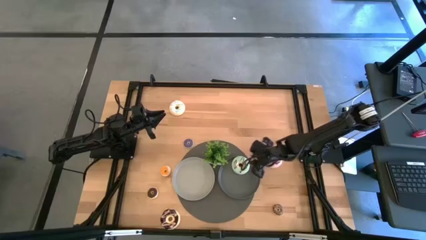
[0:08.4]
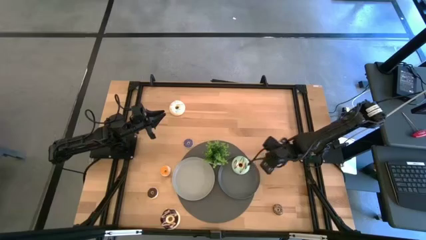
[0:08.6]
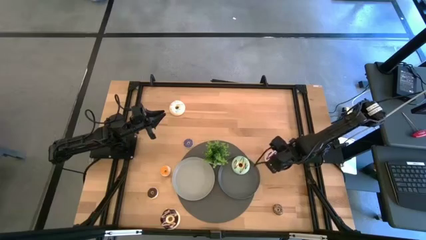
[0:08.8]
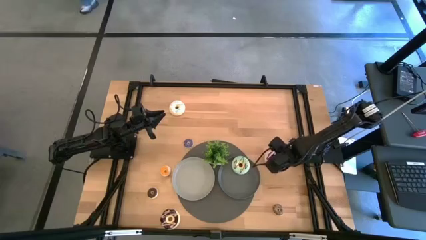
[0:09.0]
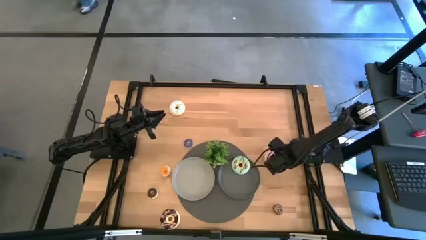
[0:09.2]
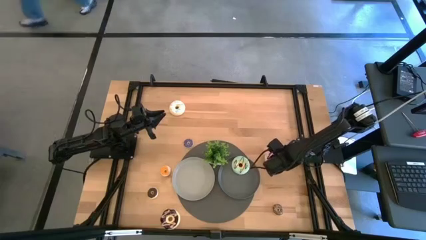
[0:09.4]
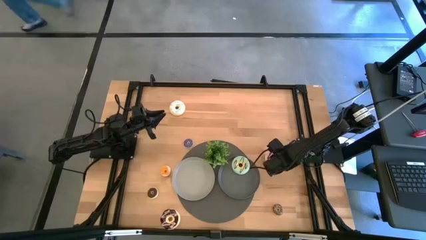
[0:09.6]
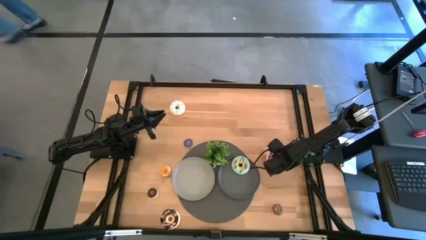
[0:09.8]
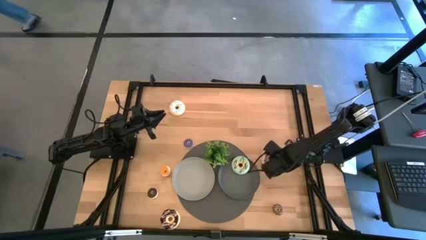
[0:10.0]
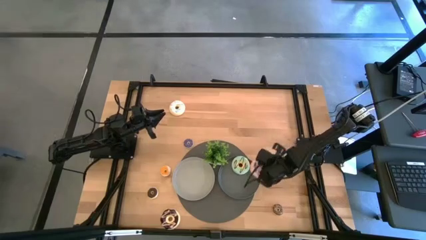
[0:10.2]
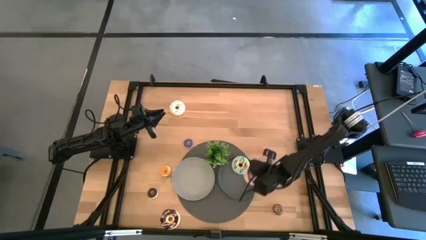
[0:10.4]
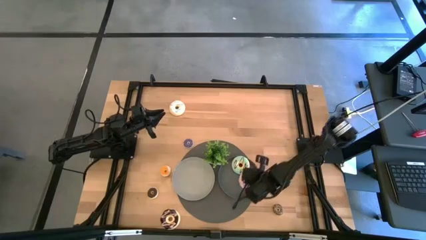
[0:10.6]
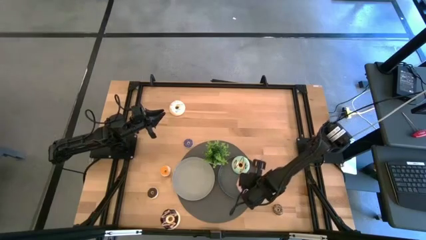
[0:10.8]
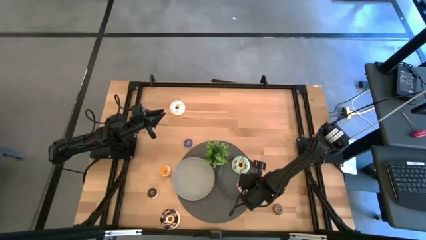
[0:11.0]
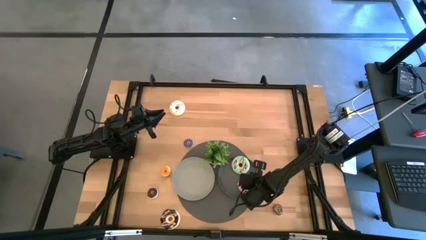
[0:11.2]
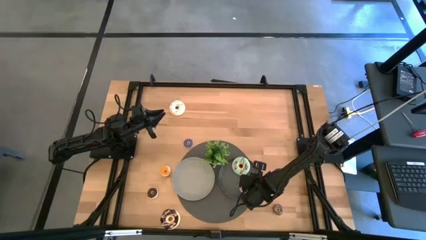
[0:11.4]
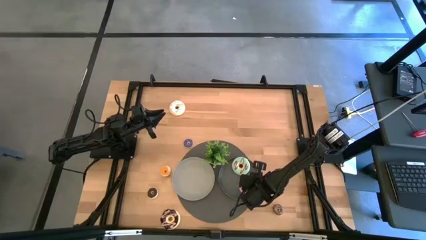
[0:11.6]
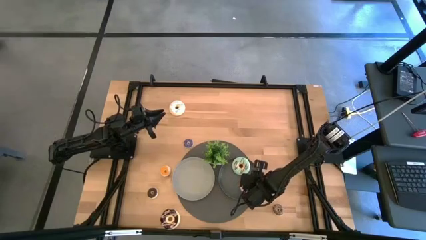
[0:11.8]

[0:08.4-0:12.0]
Task: Pick & Place donuts
Put the large purple donut on the black plate

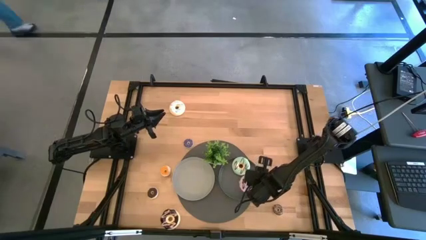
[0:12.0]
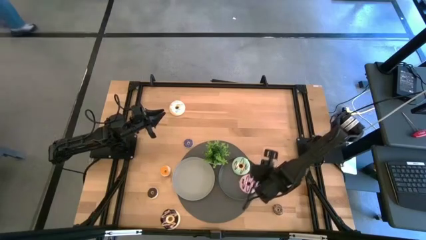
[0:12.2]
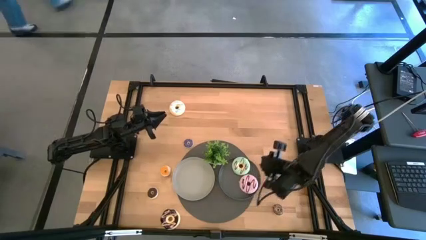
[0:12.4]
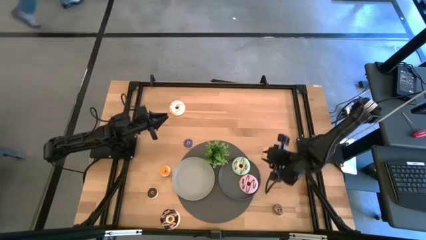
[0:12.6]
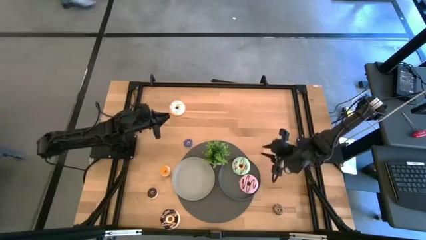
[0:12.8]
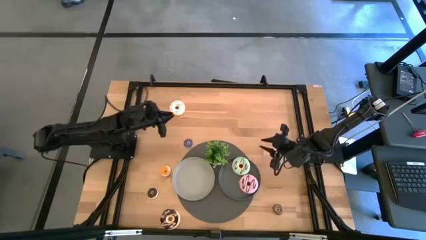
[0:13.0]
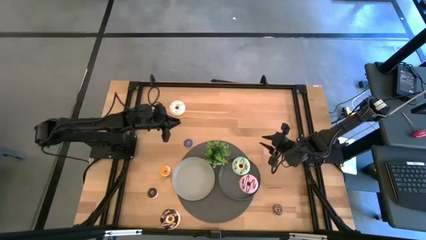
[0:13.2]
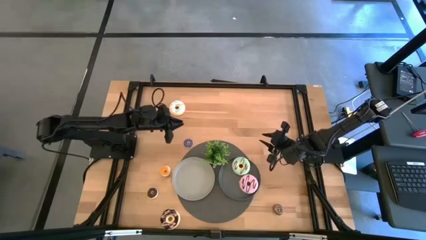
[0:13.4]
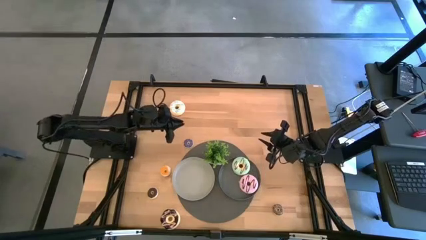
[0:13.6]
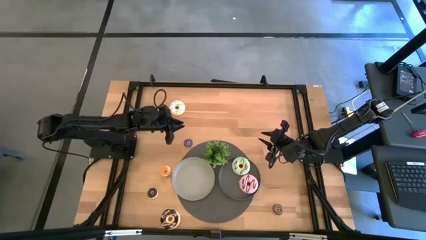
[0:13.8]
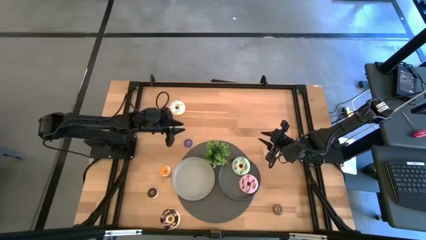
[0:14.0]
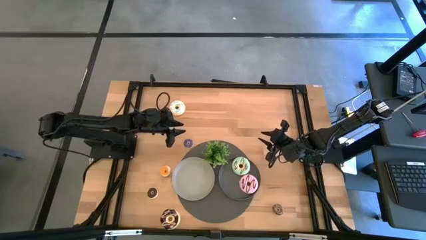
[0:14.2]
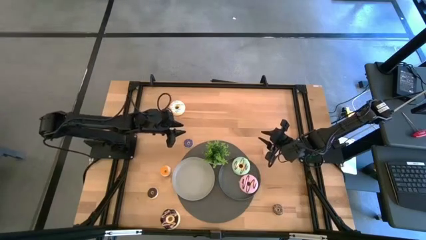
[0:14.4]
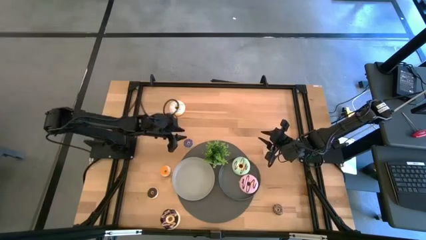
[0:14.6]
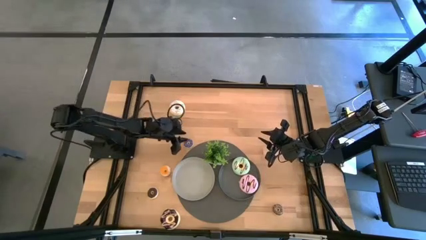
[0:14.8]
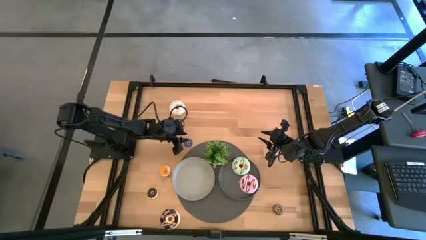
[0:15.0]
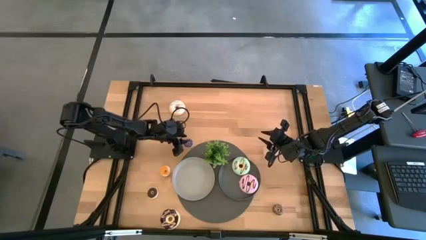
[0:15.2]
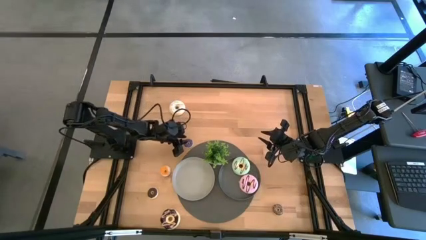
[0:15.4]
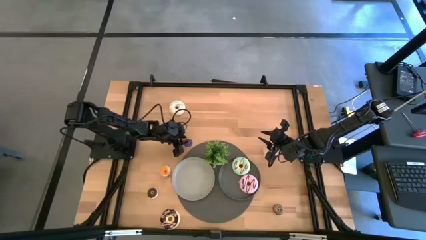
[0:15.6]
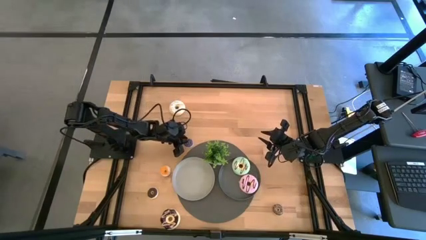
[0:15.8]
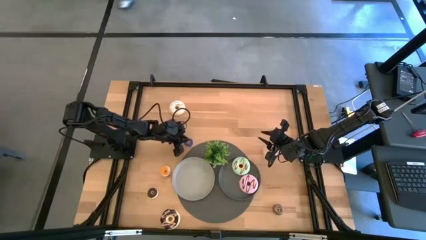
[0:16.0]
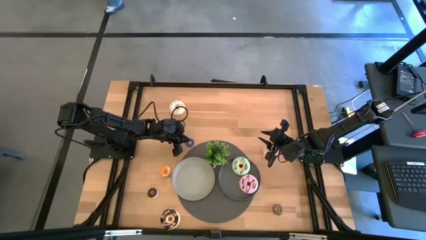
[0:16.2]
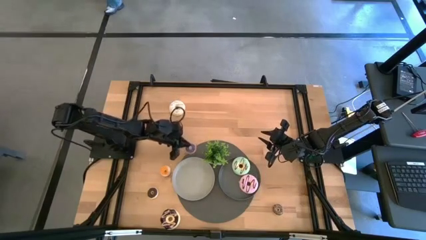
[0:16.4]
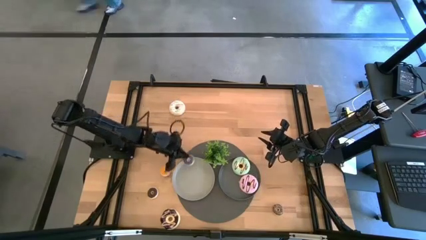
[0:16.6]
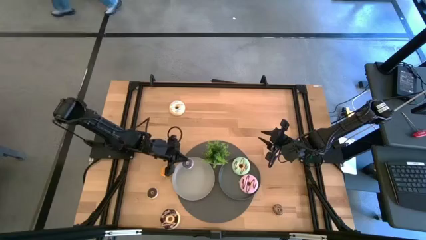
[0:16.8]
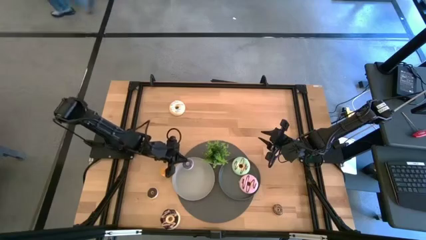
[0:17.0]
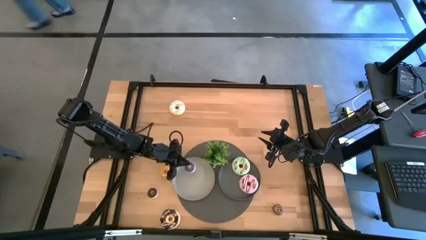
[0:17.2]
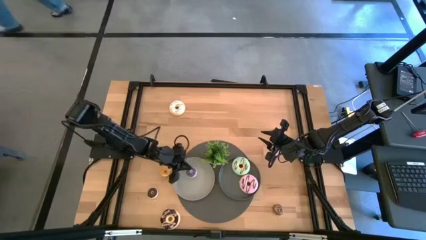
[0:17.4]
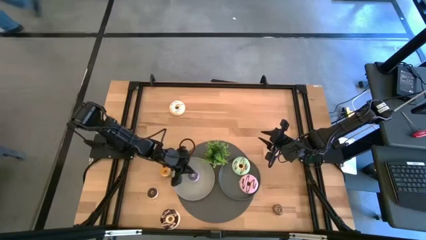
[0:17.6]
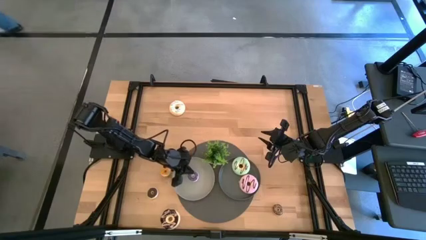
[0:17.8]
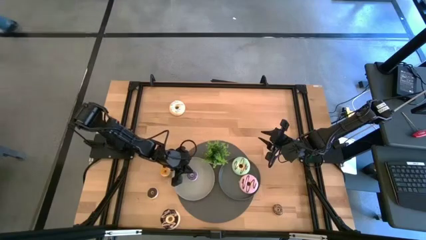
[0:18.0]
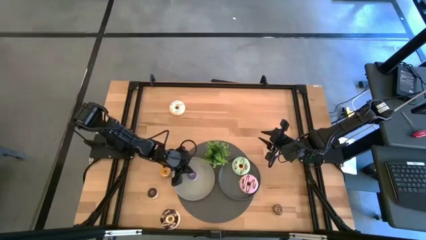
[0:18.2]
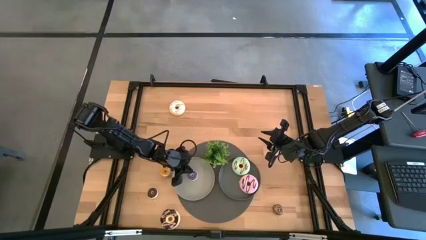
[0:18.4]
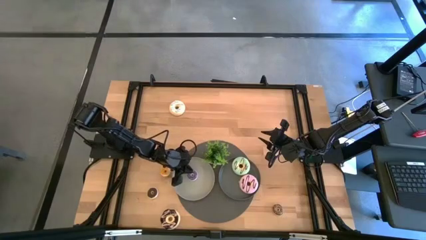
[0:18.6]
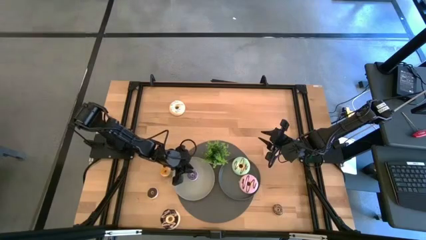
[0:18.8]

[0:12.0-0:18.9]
Put the small purple donut on the gray plate

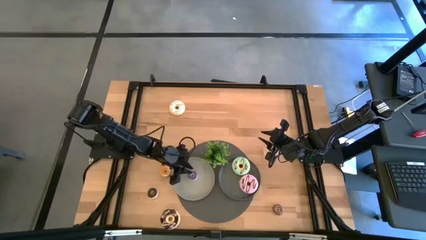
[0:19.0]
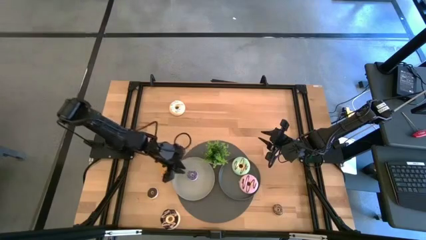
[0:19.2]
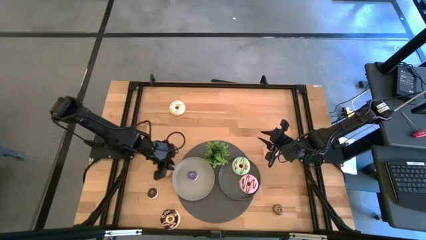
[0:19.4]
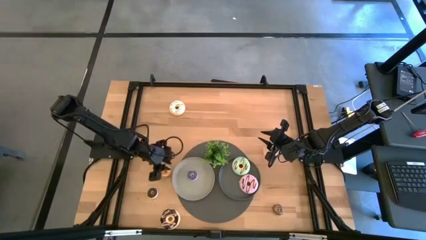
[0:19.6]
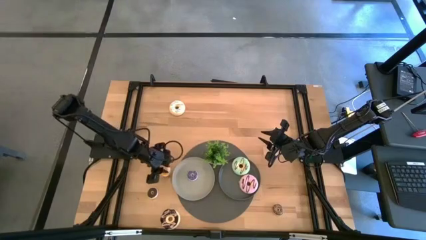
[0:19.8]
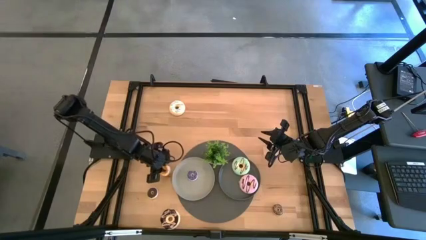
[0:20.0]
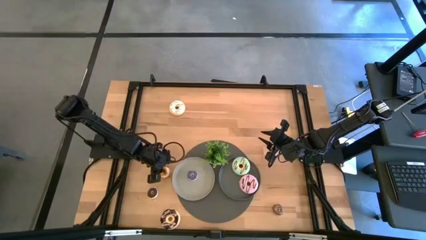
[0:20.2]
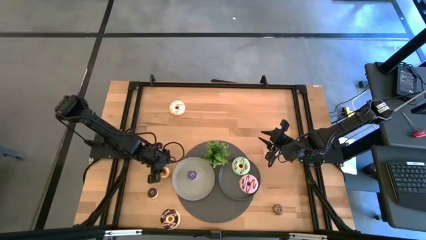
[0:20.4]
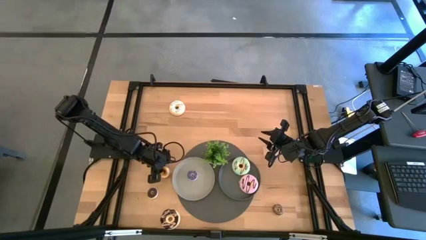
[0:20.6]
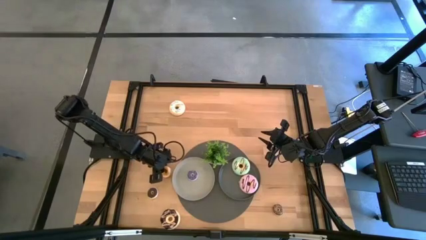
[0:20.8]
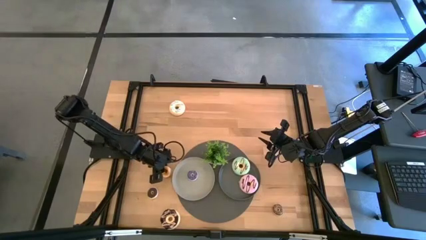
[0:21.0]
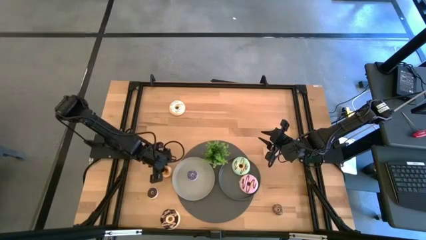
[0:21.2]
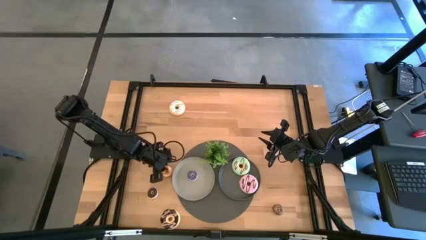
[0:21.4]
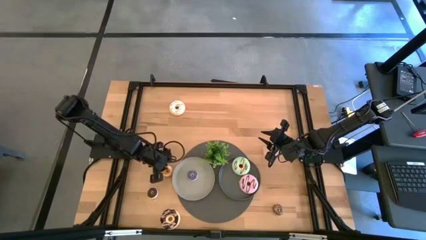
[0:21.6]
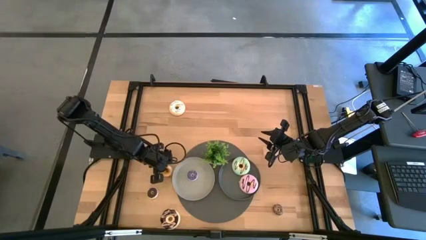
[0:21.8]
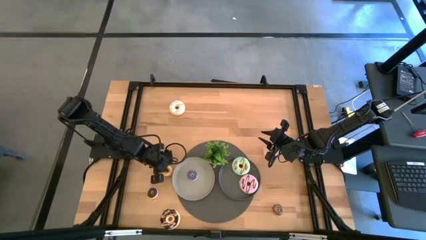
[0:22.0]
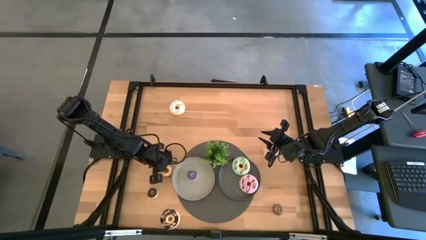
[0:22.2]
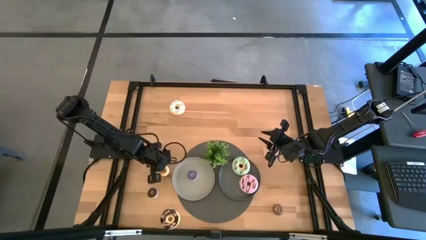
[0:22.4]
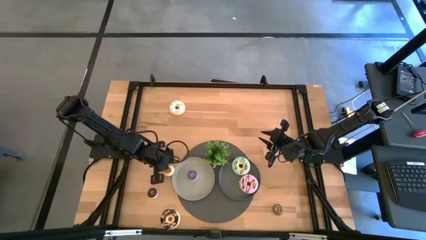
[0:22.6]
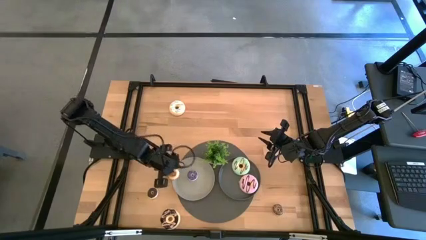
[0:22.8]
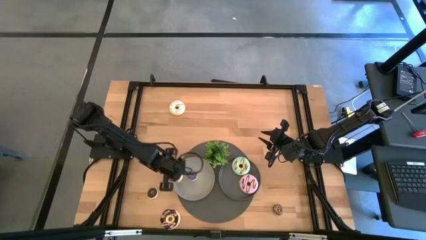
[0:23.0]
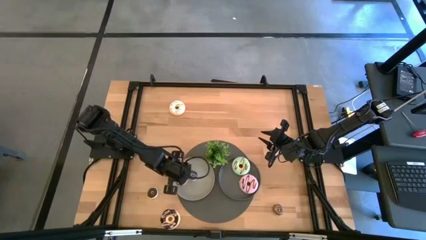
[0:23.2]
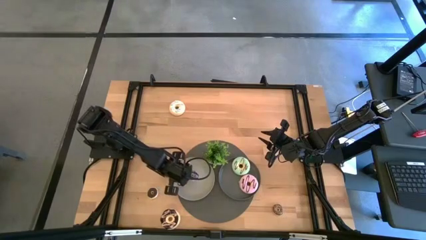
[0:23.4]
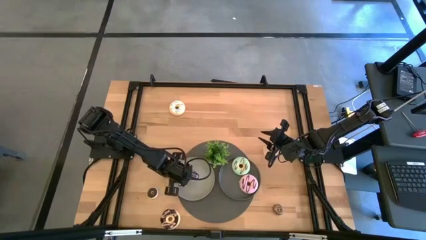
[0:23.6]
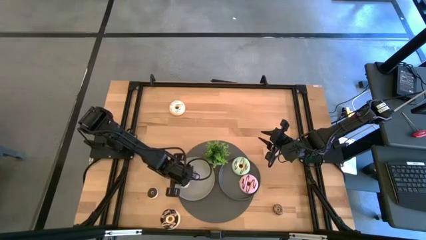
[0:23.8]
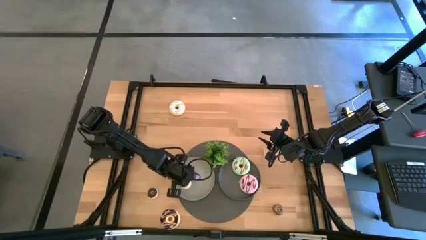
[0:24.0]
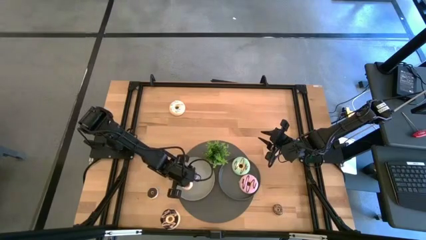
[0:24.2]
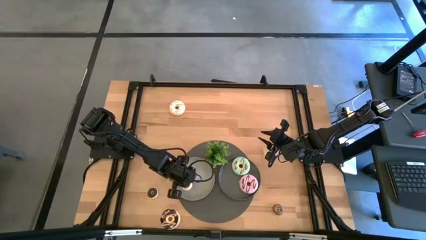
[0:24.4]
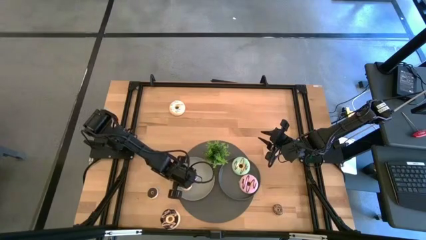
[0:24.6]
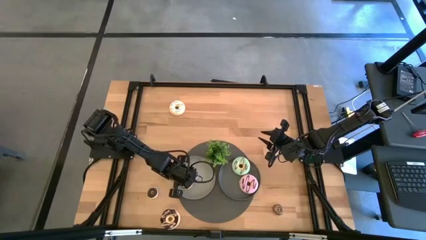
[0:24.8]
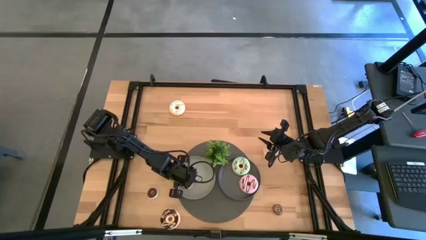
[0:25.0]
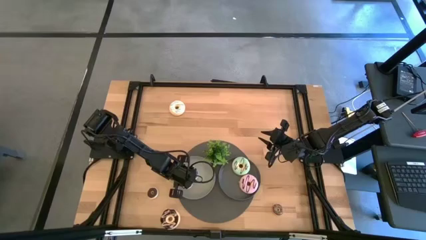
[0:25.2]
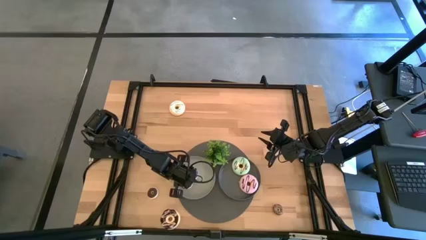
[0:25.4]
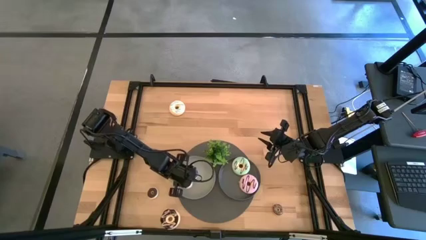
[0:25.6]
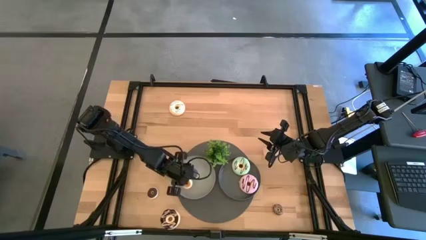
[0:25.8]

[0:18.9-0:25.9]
Put the small orange donut on the gray plate
